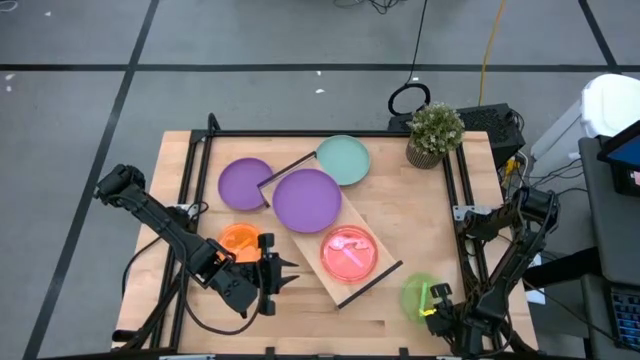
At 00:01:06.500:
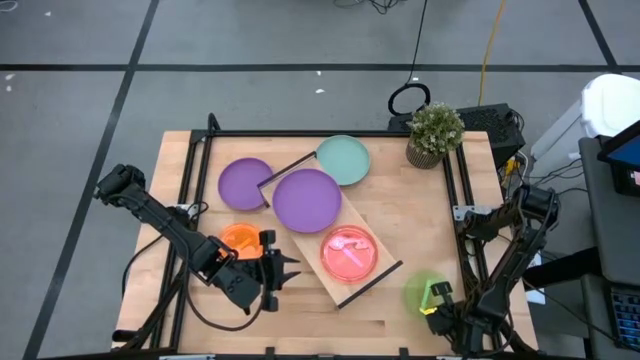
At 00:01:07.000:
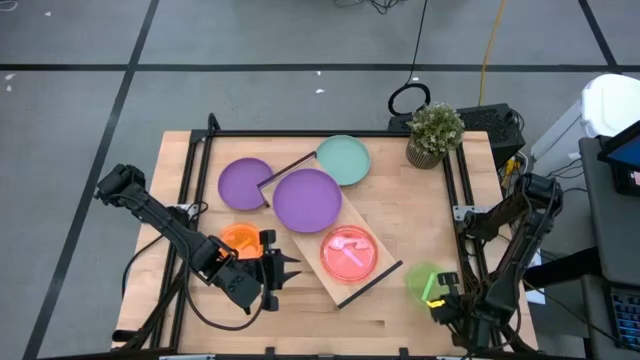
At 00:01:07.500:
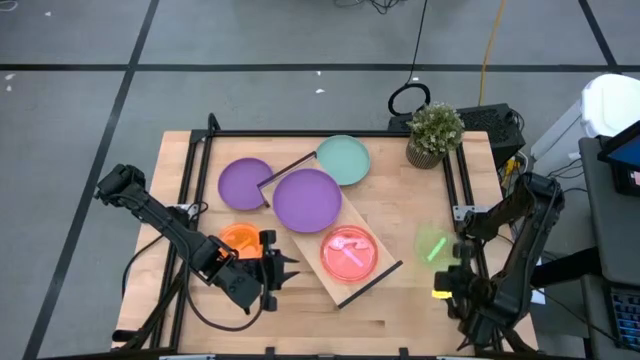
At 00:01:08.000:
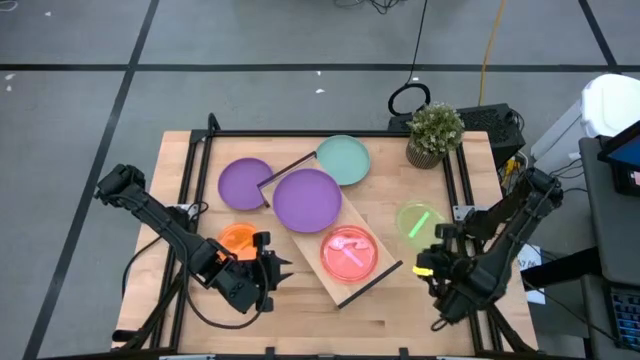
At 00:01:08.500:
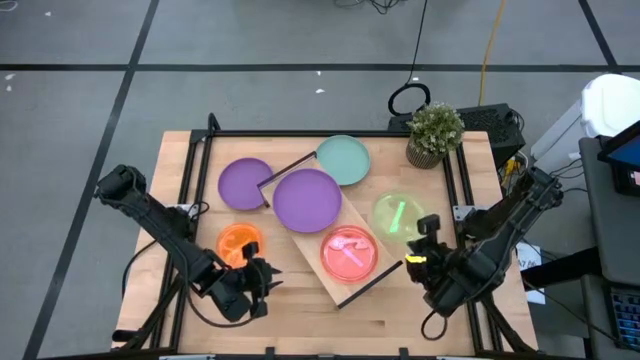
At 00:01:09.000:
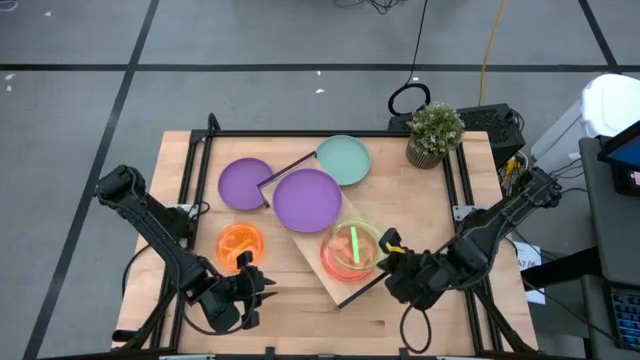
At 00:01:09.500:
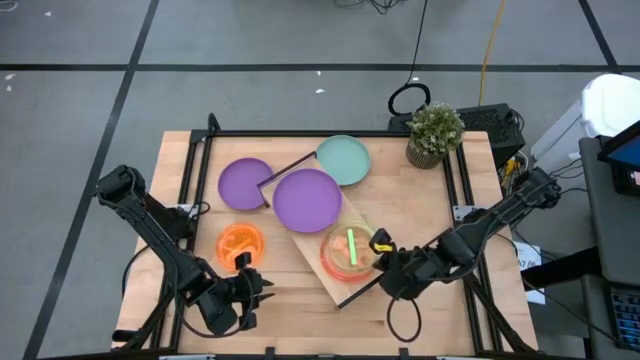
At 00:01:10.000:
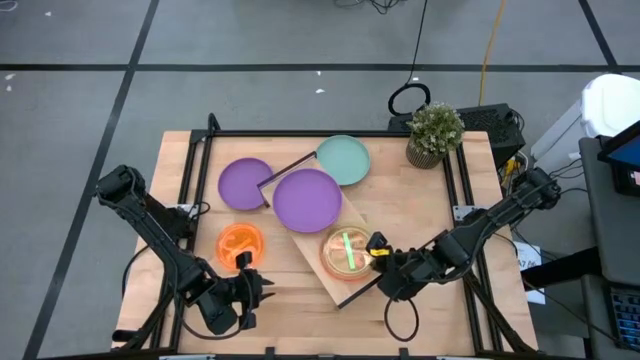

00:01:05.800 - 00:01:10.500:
Task: Place and stack plates onto a shelf
Stack the green plate on top of the red plate on the shelf

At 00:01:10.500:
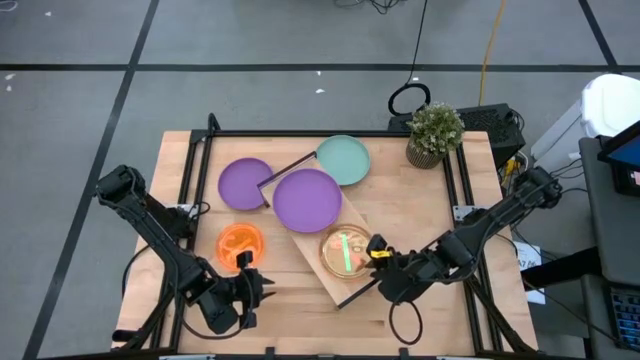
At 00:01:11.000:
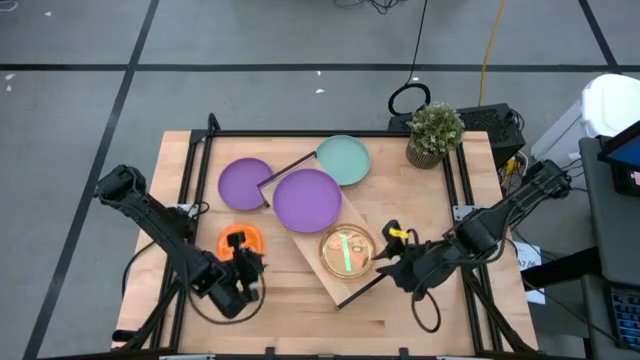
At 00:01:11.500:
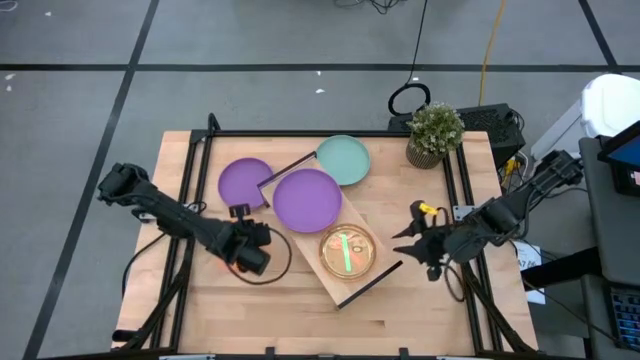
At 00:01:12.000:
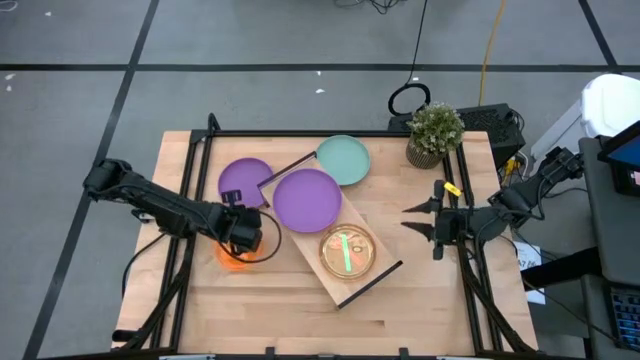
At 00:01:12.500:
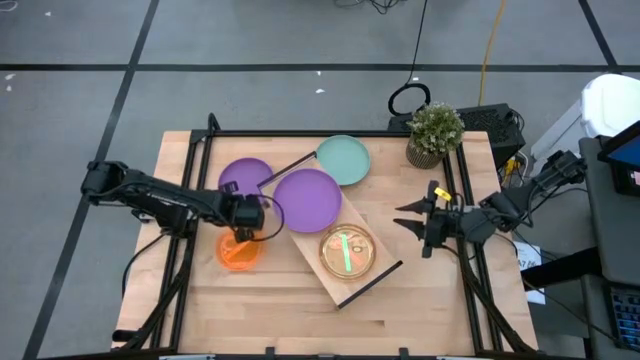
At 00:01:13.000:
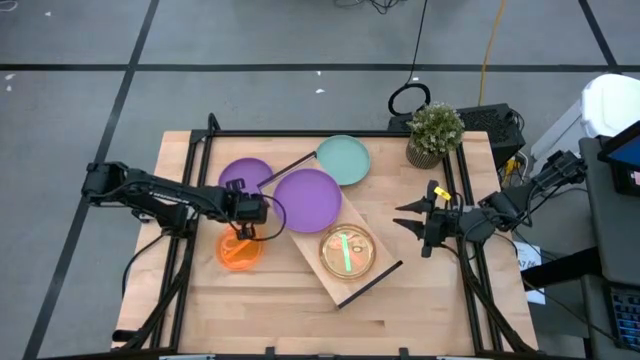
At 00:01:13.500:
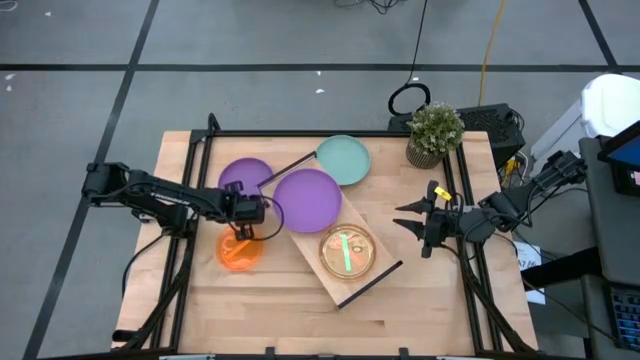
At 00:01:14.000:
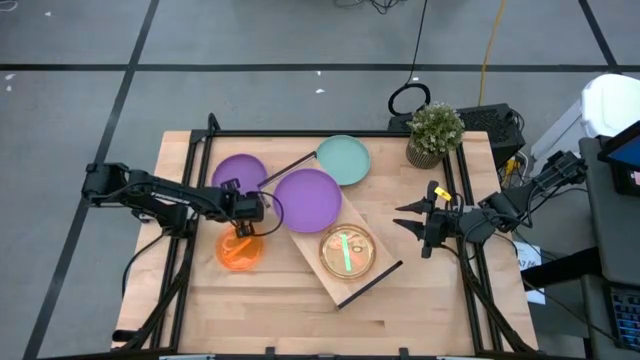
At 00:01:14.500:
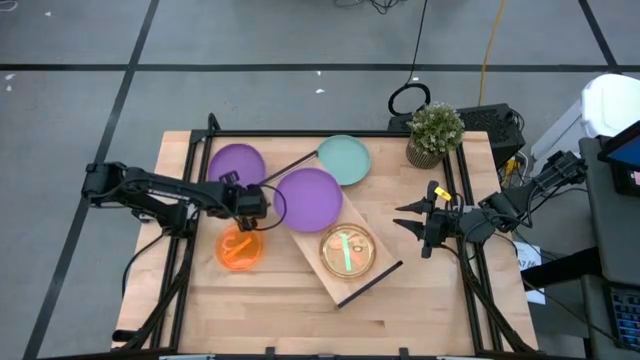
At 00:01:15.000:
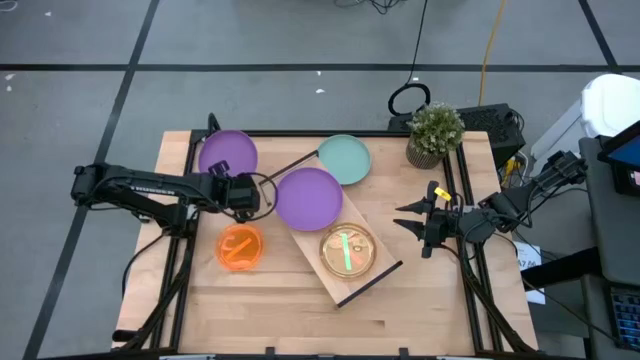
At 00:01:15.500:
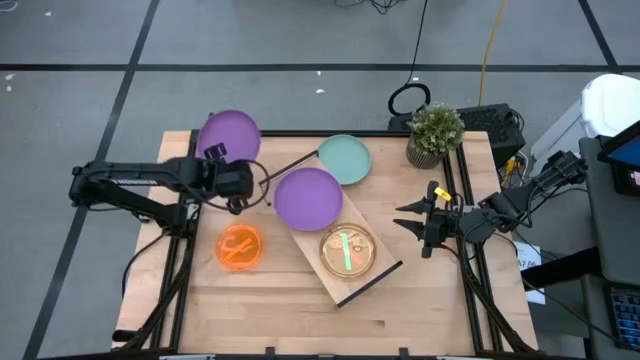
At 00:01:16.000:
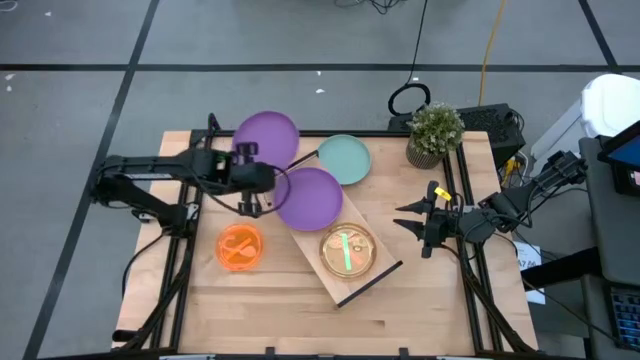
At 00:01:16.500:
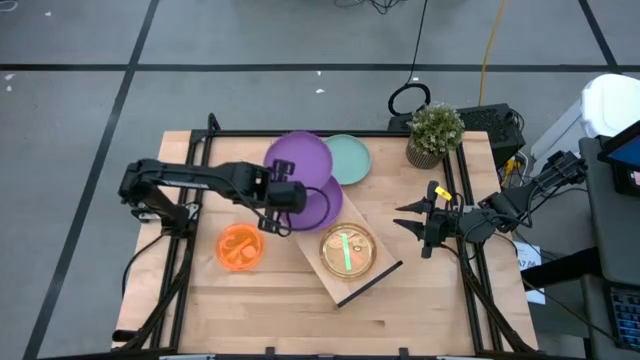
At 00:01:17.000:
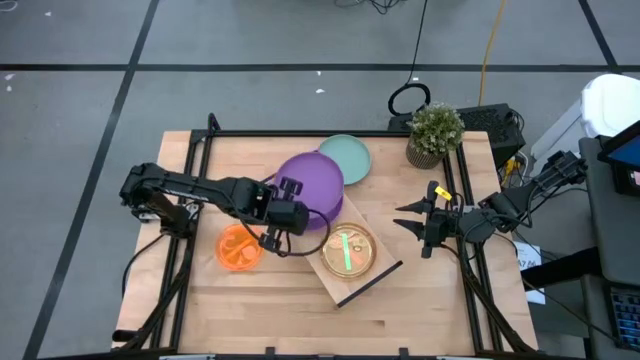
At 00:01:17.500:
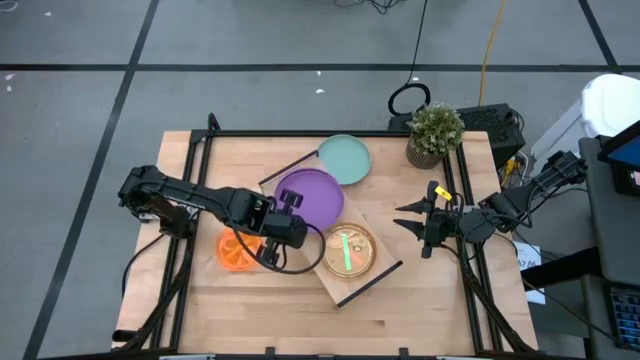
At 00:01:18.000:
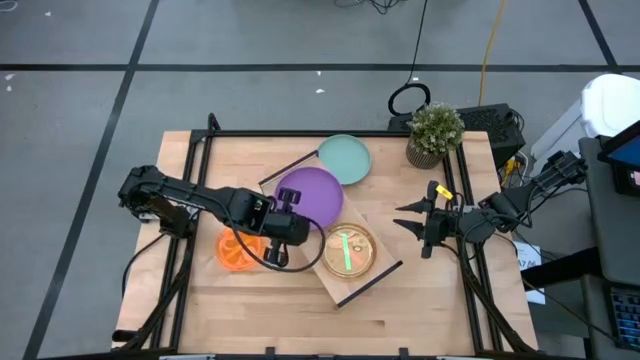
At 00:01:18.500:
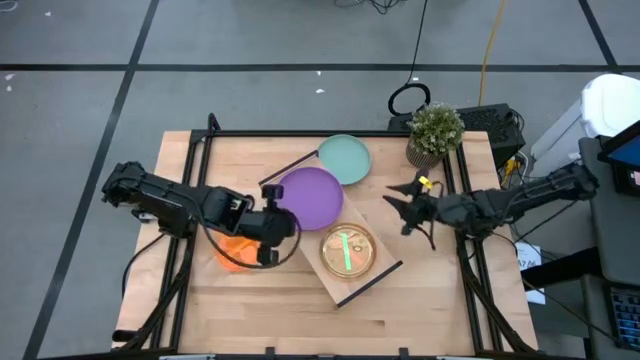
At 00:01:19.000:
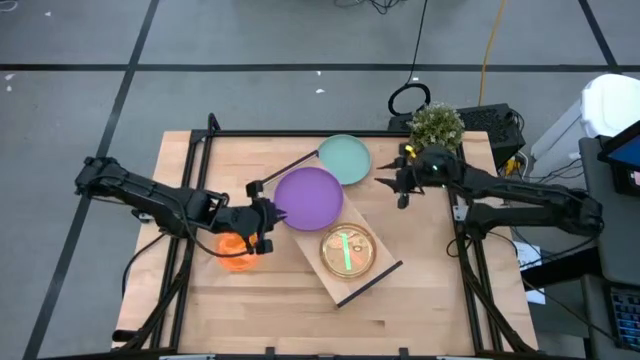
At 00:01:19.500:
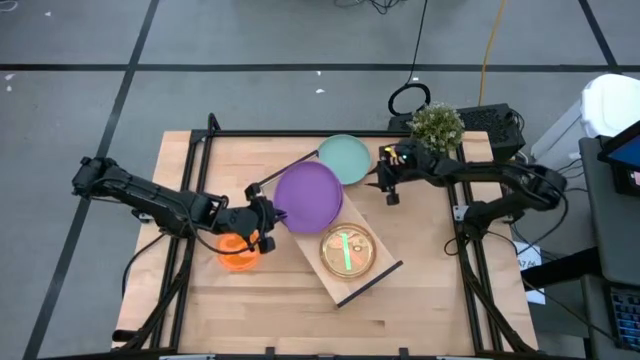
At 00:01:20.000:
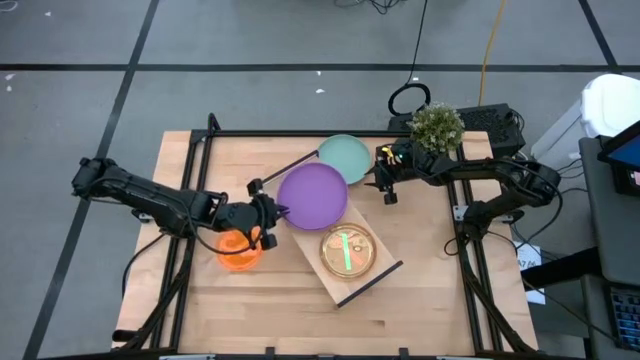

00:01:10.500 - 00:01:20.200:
Stack the purple plate on top of the purple plate on the shelf

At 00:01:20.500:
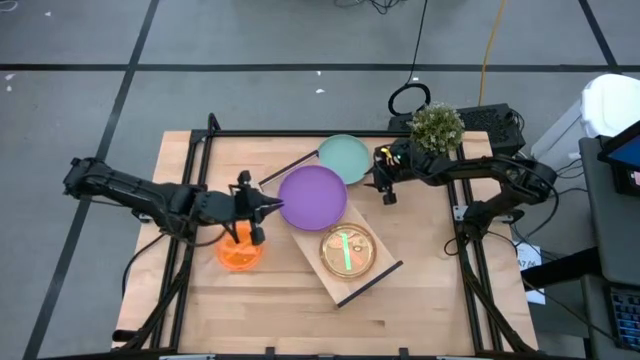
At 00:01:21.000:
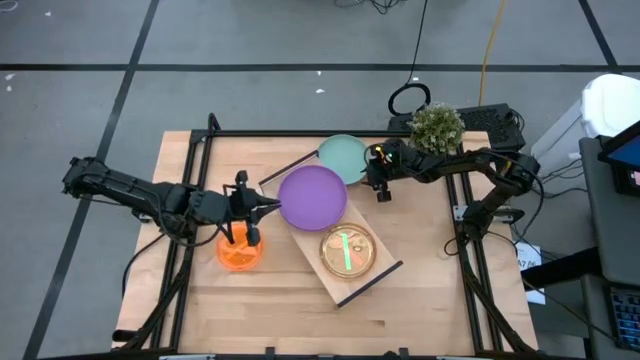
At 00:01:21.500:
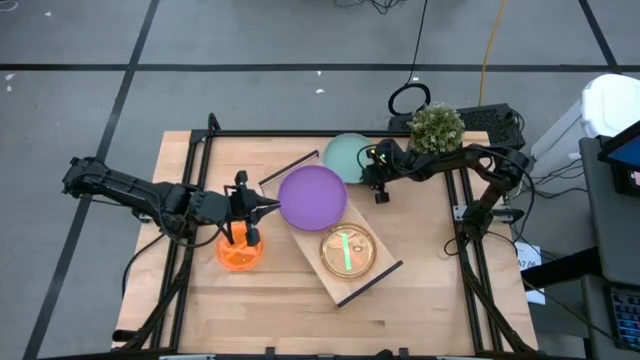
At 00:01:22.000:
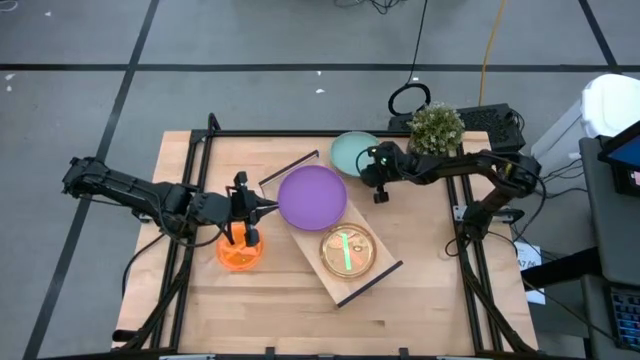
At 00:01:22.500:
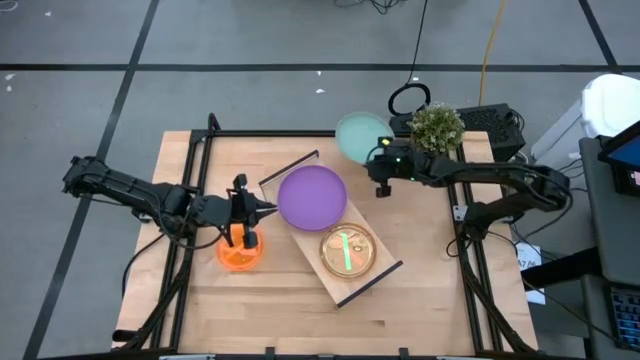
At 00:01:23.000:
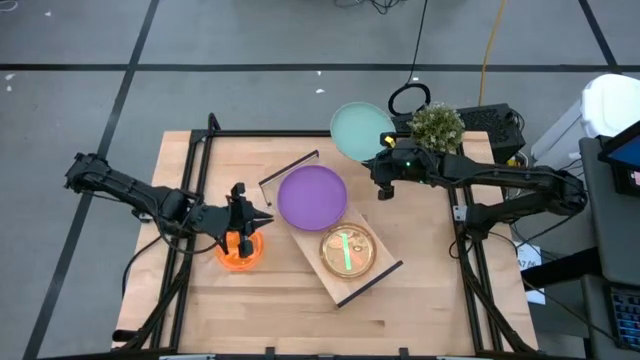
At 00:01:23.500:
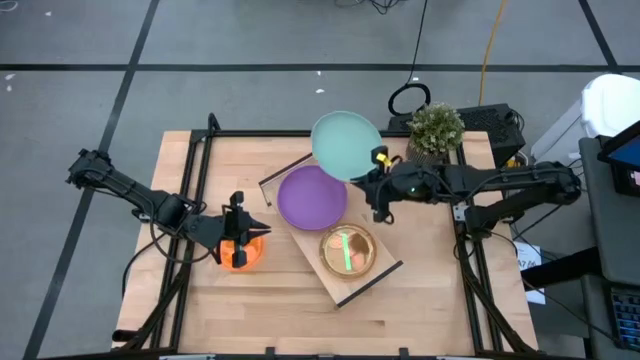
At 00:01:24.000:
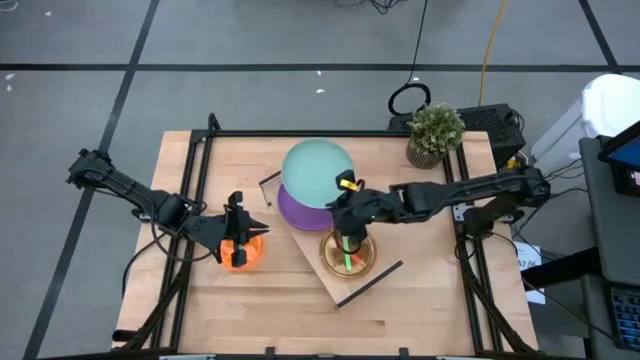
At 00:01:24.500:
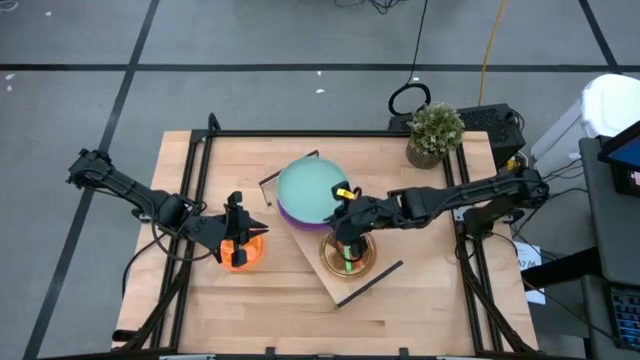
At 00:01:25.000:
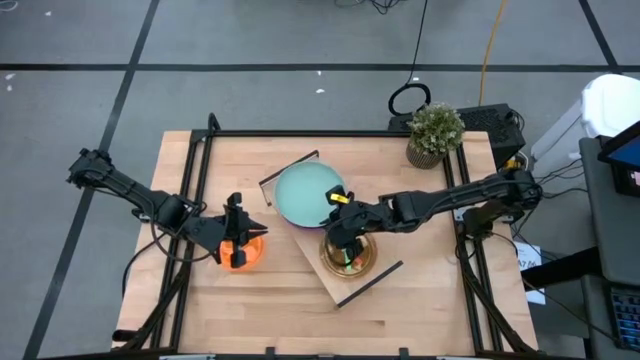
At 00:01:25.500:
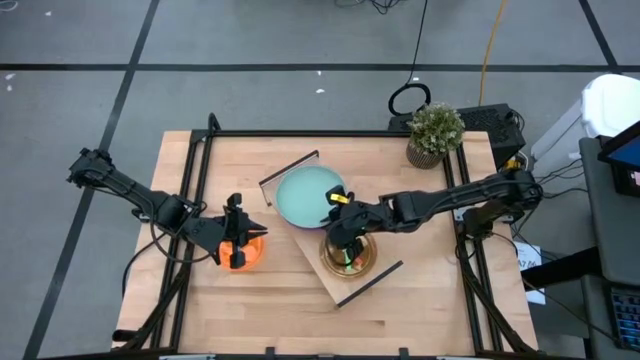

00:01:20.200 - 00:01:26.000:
Stack the light blue plate on top of the purple plate on the shelf
